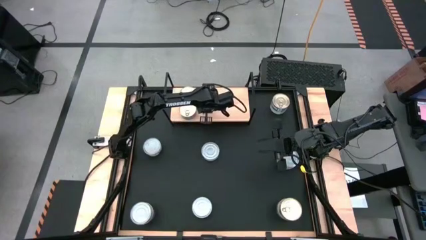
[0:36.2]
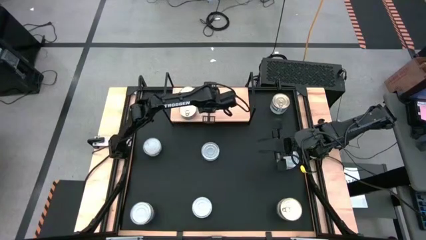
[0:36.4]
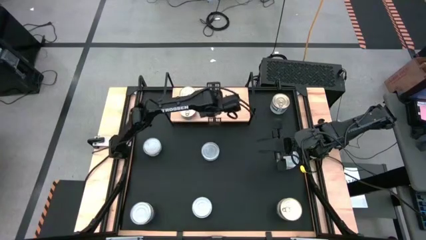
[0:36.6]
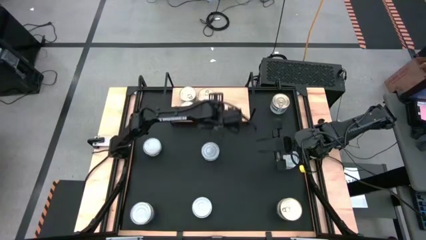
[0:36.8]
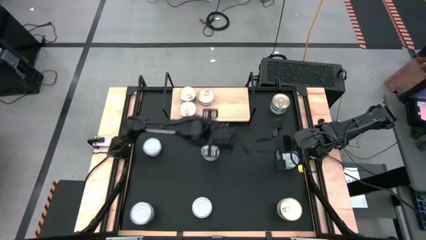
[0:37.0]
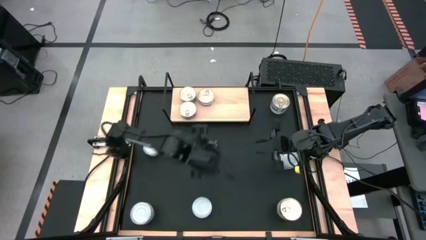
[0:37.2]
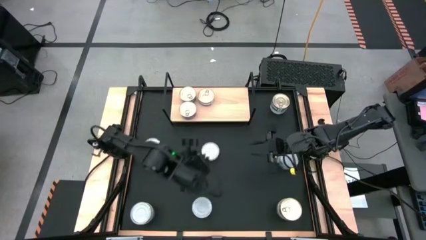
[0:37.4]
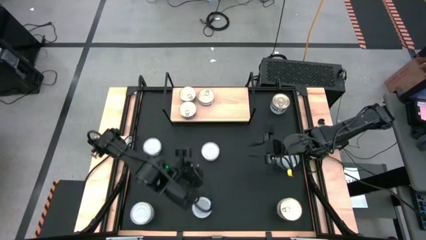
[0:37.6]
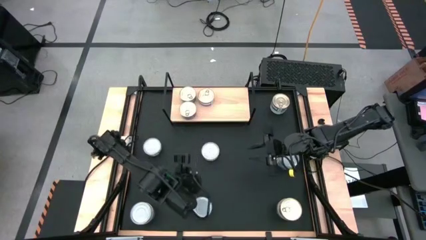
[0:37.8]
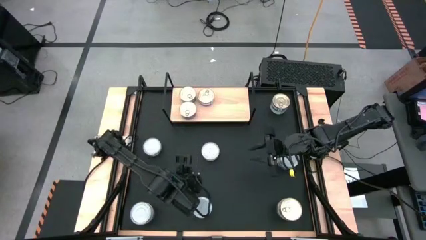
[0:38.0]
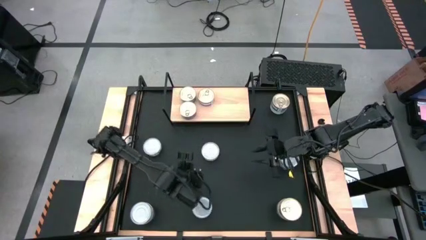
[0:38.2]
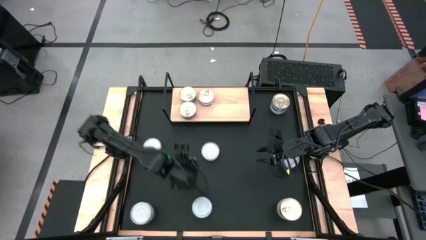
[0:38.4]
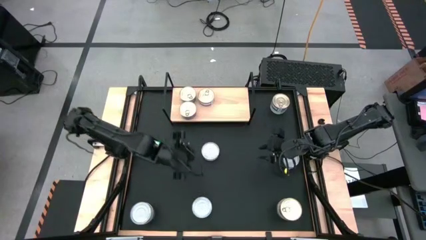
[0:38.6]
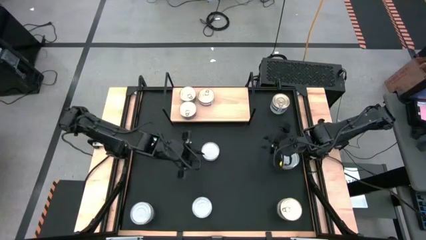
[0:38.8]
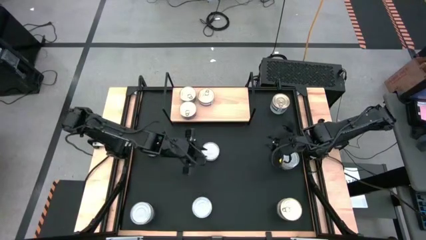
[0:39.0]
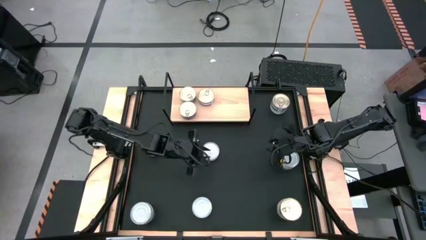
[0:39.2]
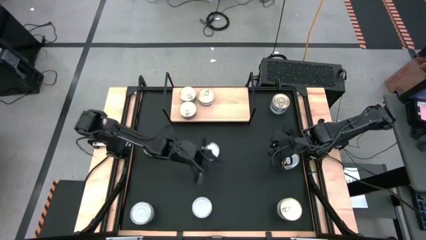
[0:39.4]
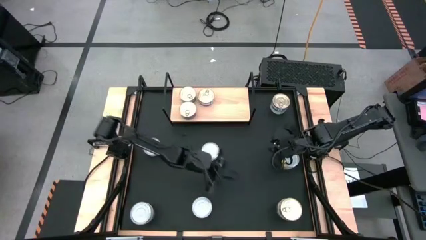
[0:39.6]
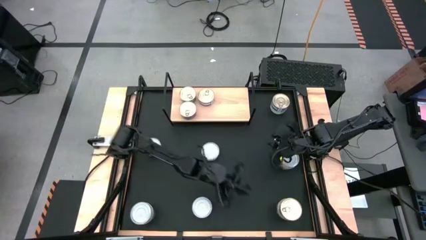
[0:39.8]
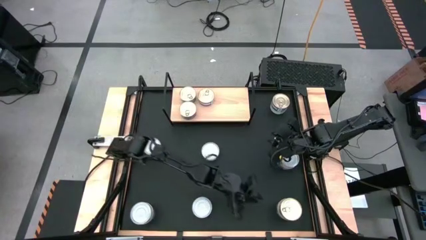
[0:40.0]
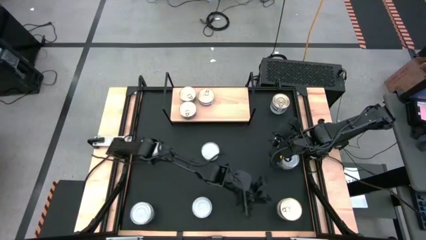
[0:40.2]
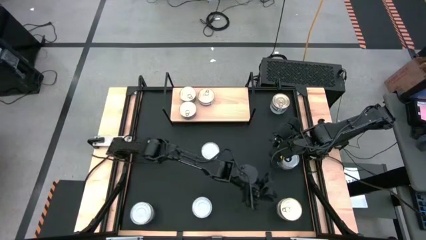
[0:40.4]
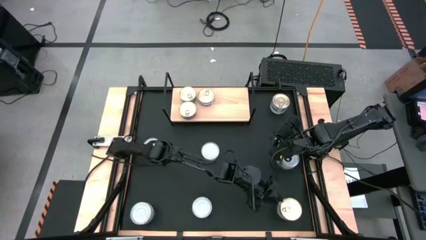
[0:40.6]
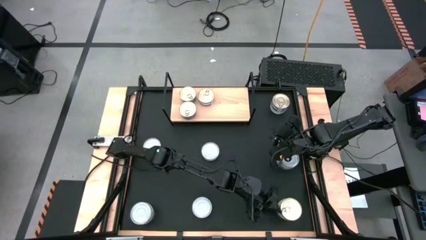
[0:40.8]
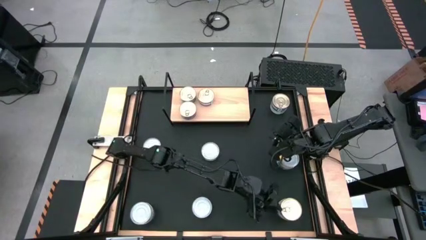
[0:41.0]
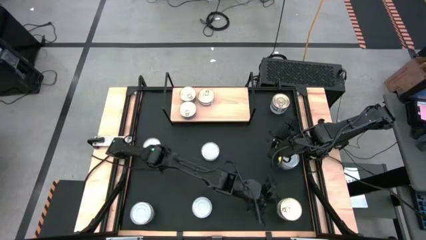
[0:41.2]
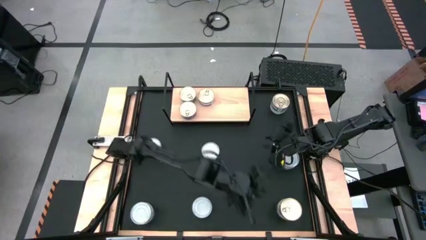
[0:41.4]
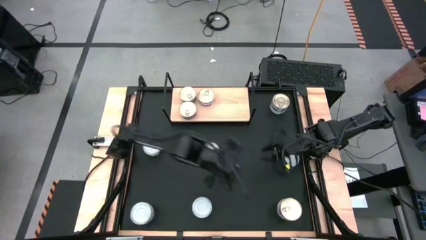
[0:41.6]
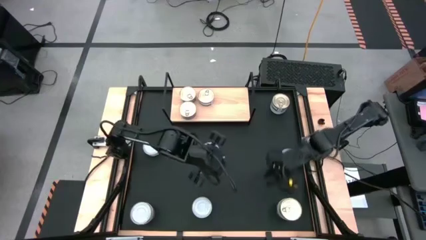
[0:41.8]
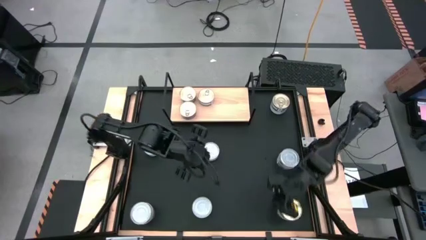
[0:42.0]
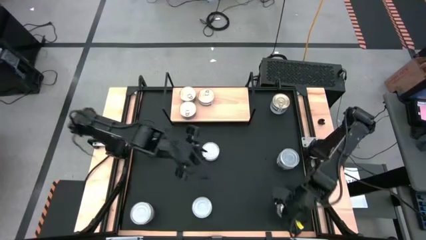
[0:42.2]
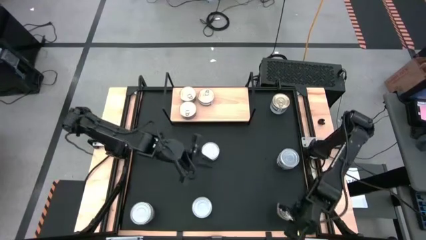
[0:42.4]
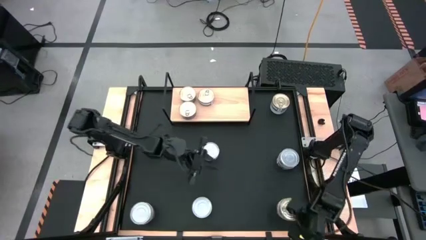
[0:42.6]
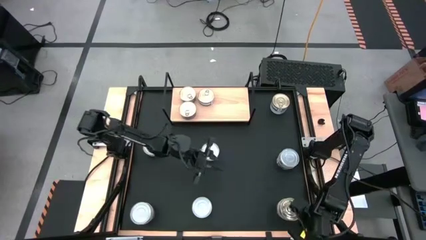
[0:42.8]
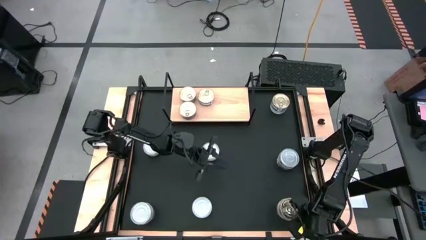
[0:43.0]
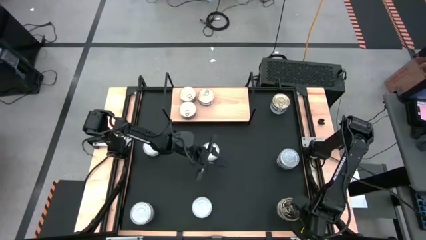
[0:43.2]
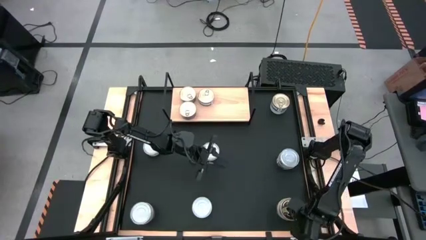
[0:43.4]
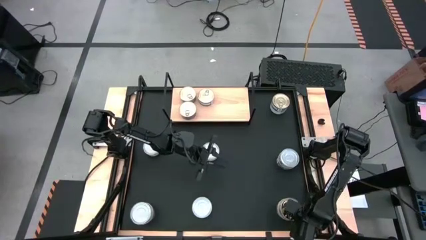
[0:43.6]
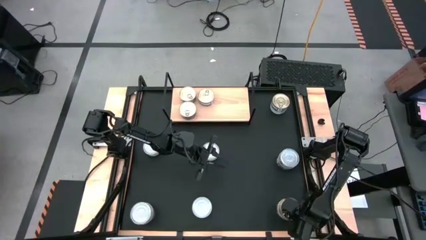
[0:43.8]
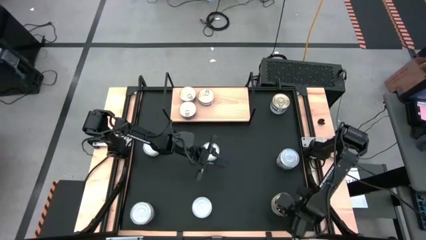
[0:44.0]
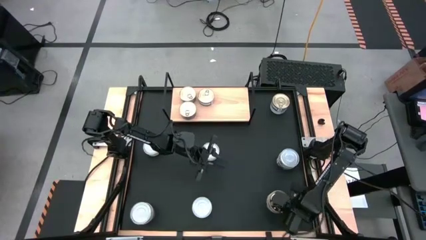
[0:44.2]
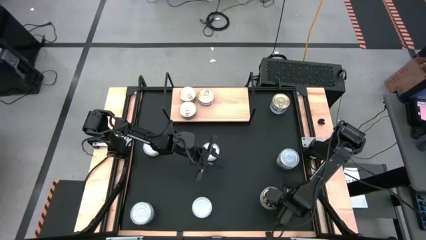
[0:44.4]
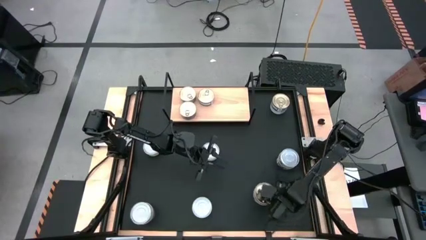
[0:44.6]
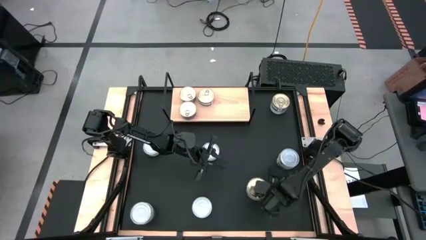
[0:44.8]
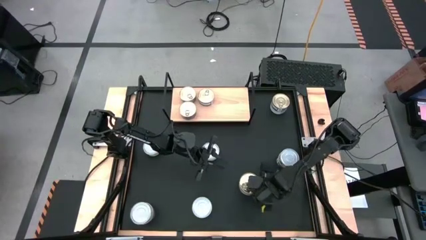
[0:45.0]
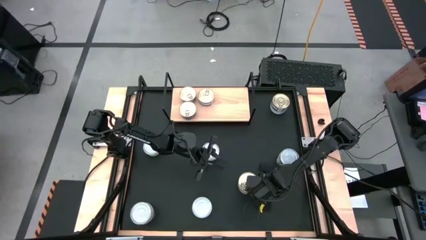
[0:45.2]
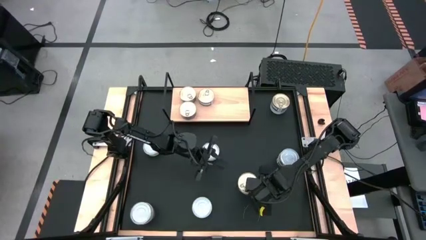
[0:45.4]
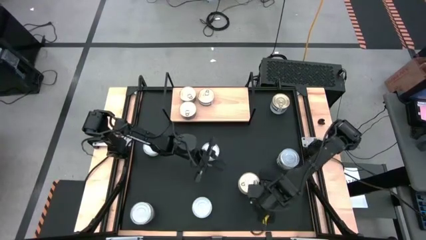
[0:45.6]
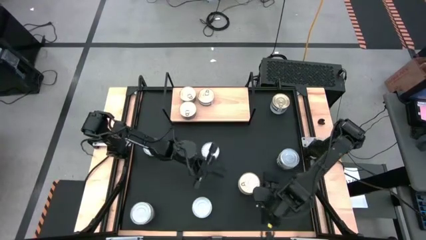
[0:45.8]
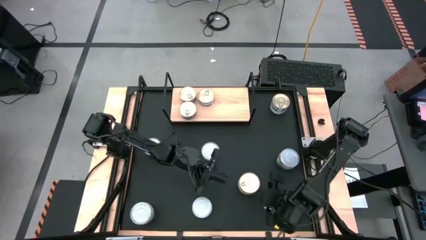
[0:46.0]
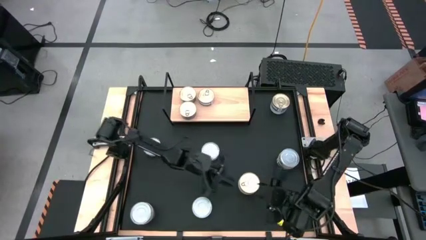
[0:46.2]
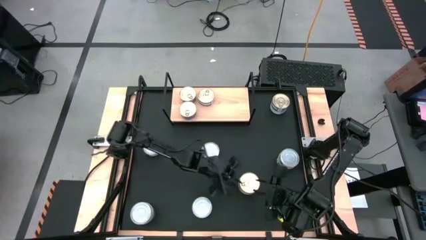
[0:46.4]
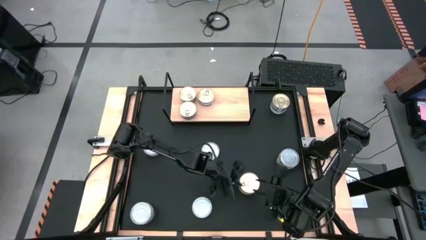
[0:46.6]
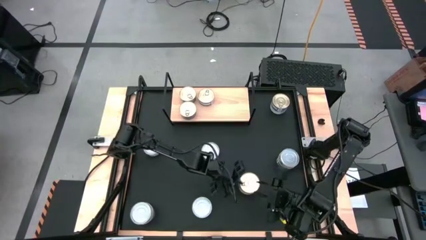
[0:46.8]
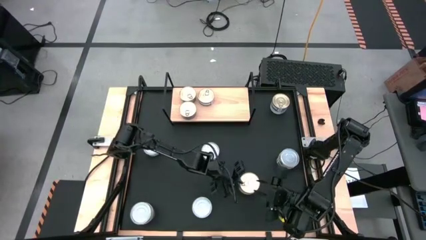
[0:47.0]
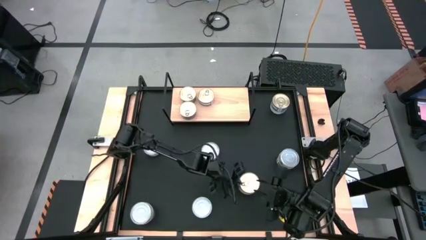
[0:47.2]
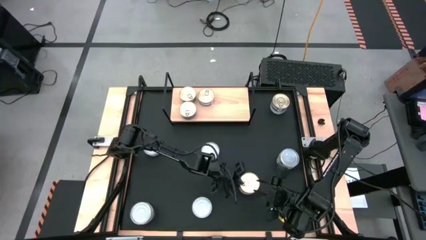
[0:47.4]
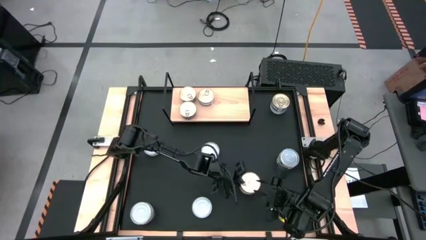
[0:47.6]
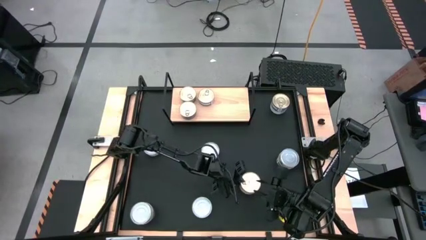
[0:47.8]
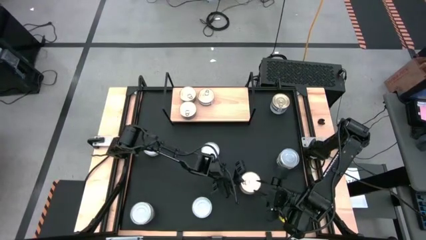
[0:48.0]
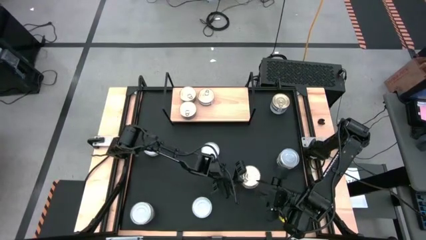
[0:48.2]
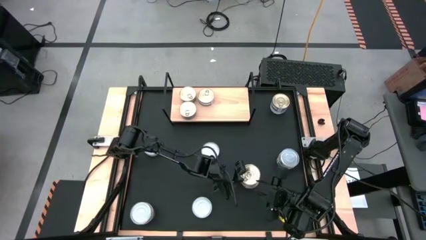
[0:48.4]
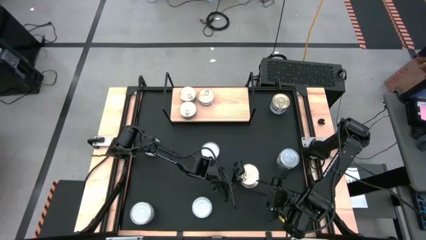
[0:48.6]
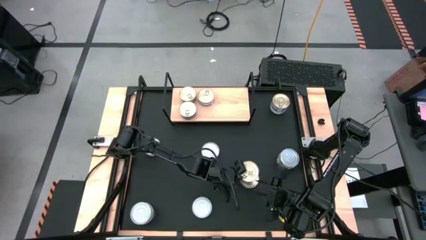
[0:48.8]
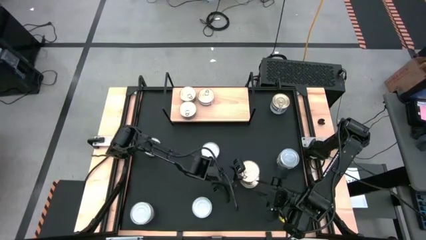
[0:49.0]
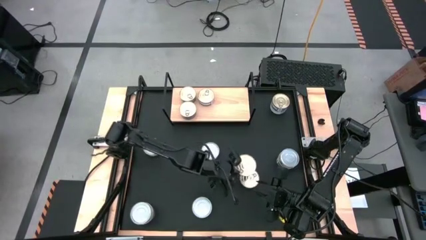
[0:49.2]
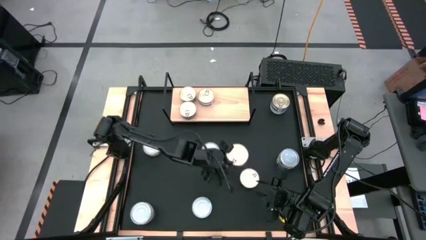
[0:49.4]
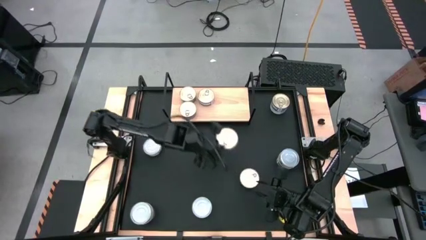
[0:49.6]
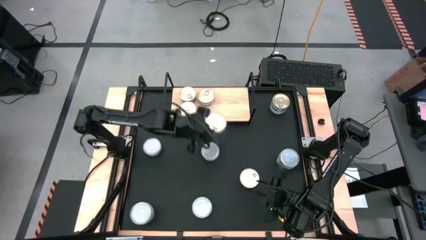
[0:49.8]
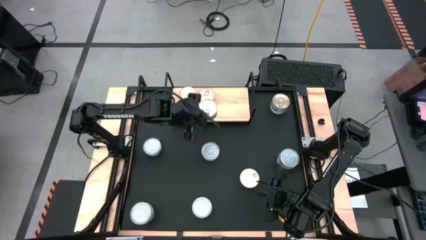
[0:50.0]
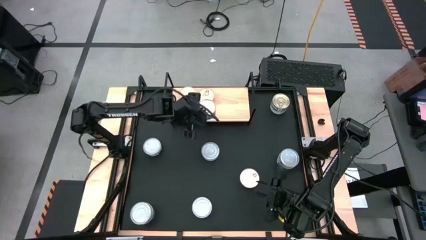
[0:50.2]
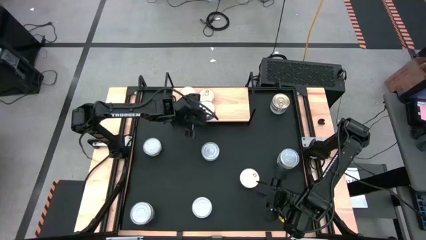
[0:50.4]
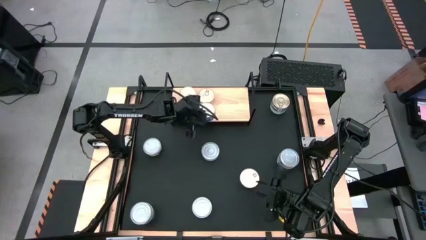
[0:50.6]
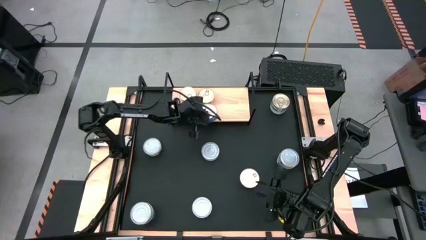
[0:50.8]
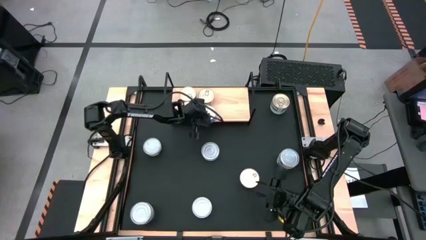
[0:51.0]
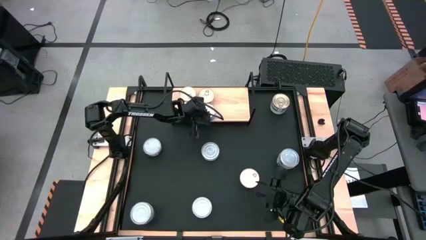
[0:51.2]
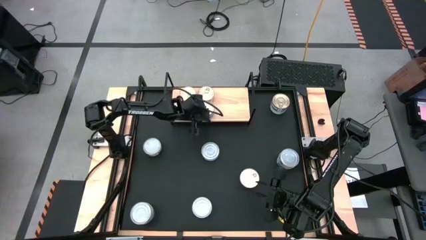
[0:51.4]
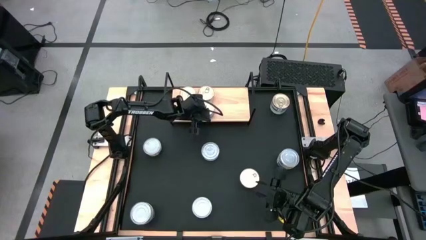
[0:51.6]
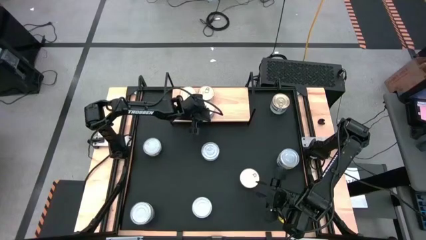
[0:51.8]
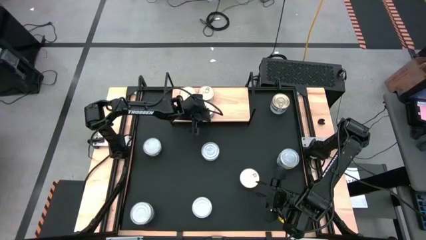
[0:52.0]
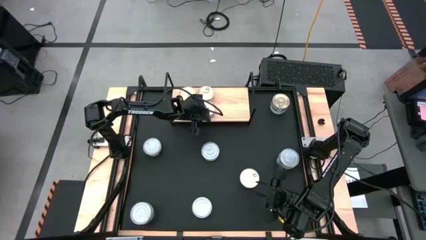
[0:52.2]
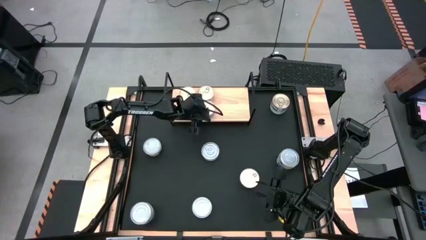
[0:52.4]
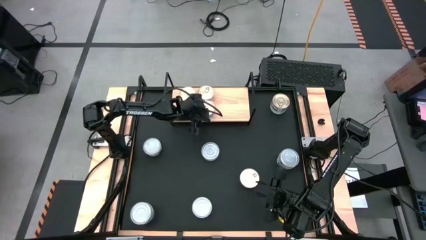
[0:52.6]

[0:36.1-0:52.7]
Task: Stack canned seafood by type on shelf
Put the blue tuna can on the shelf

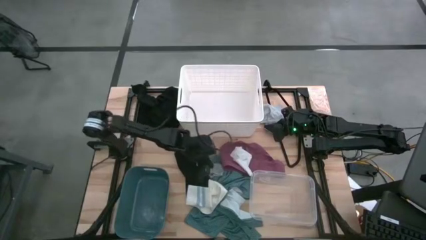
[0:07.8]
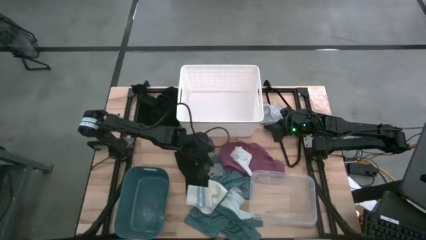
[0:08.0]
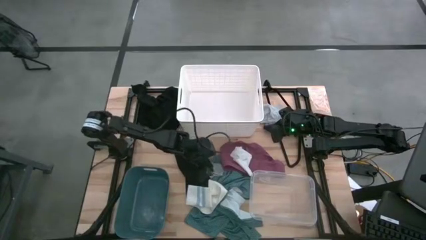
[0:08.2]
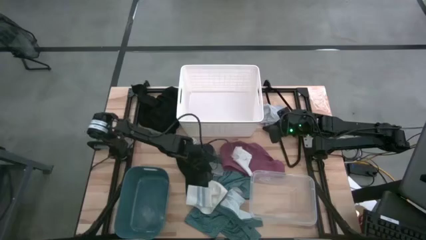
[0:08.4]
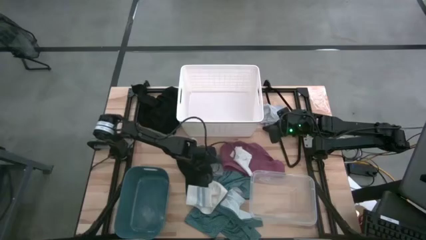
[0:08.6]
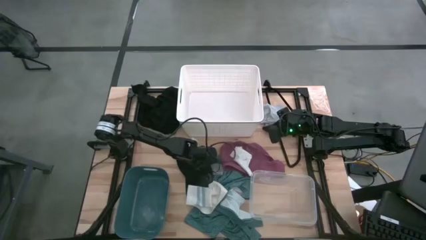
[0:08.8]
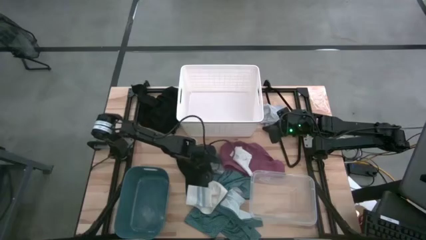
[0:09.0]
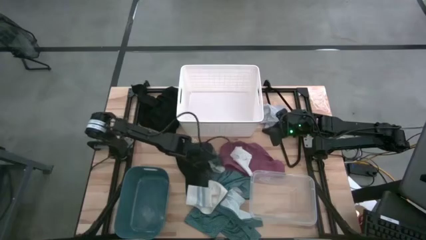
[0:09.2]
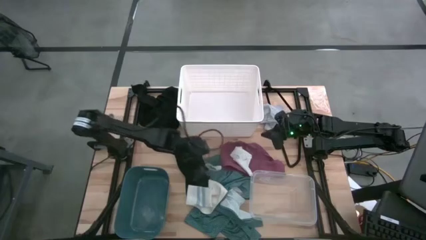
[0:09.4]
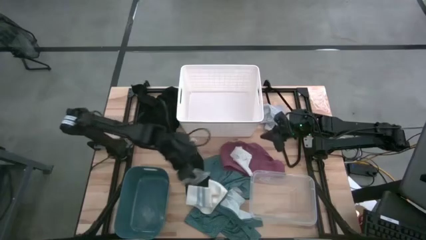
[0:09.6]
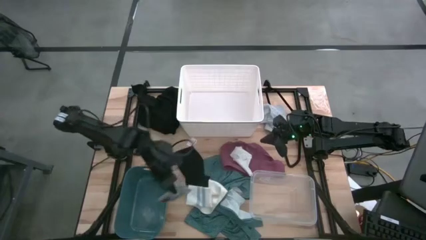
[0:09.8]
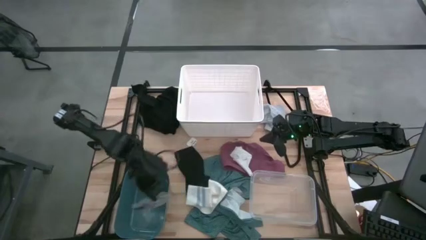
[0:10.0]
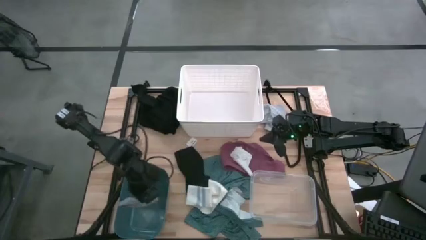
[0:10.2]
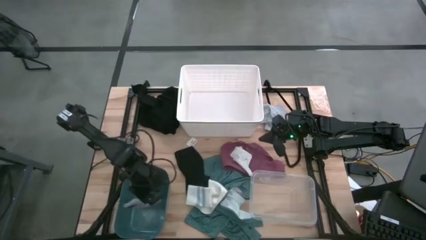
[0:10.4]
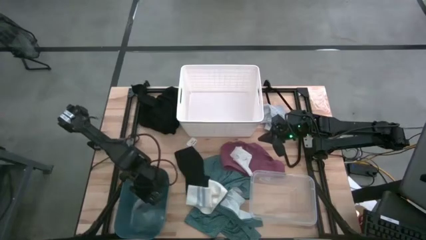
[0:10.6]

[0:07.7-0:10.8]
Task: Pick & Place Cloths
Put the gray striped sock into the blue bin
